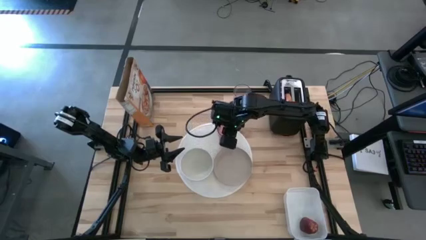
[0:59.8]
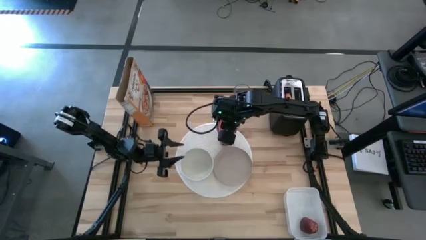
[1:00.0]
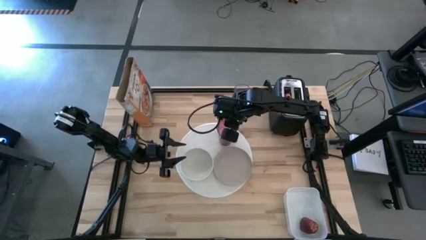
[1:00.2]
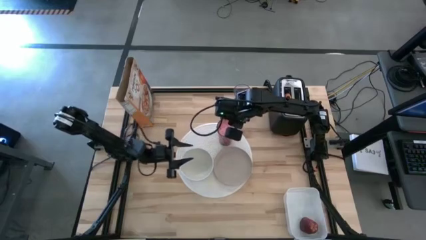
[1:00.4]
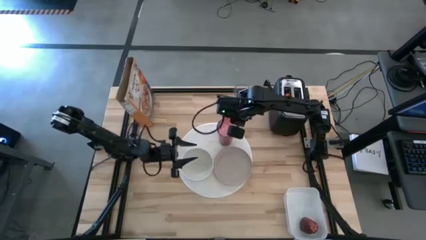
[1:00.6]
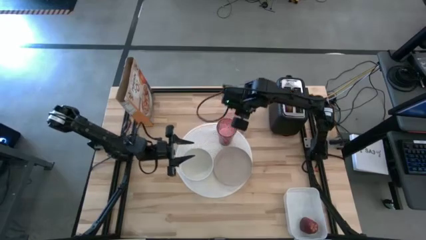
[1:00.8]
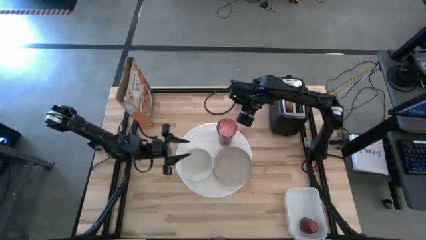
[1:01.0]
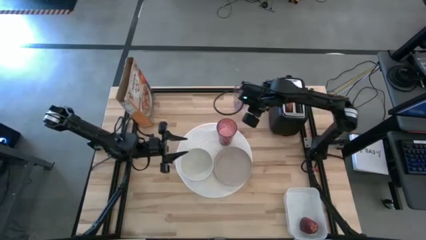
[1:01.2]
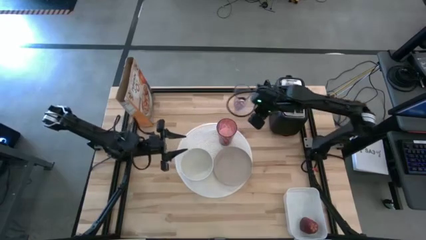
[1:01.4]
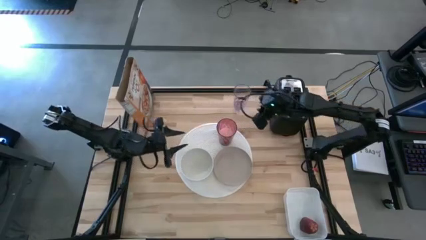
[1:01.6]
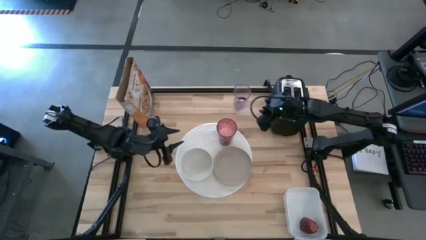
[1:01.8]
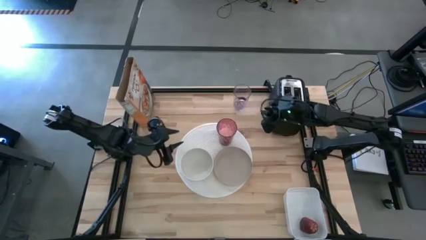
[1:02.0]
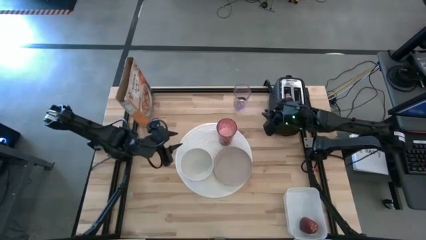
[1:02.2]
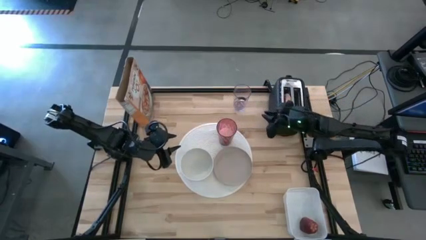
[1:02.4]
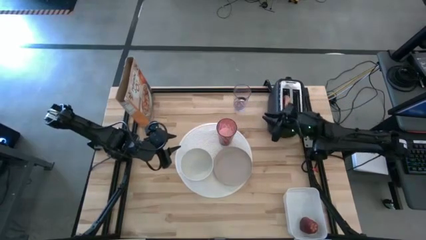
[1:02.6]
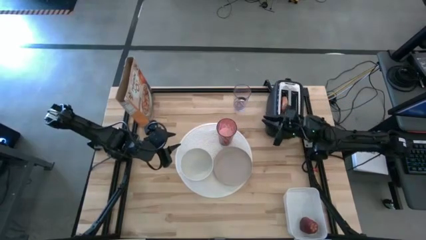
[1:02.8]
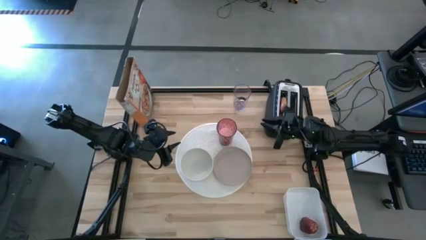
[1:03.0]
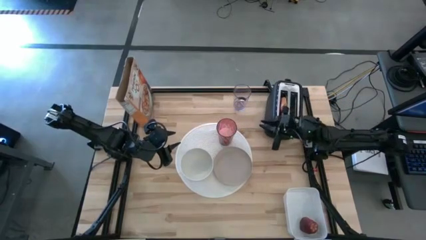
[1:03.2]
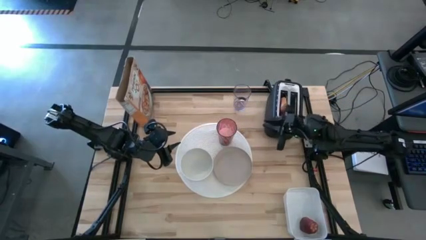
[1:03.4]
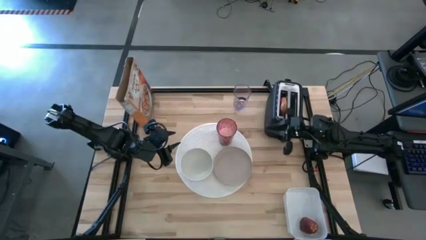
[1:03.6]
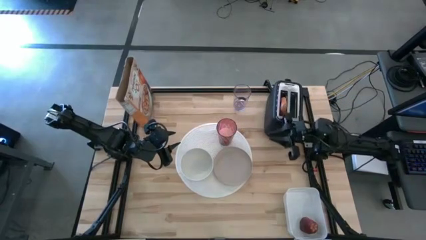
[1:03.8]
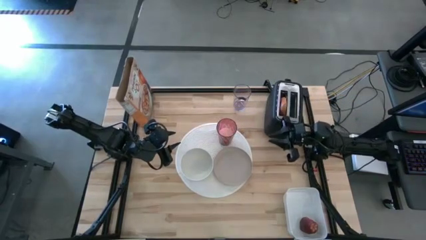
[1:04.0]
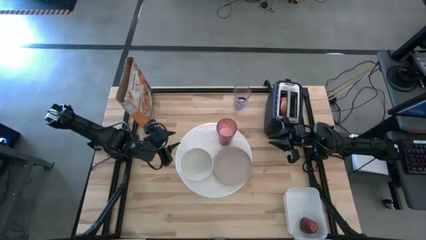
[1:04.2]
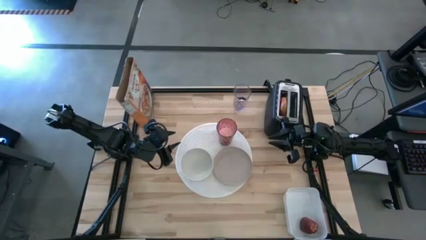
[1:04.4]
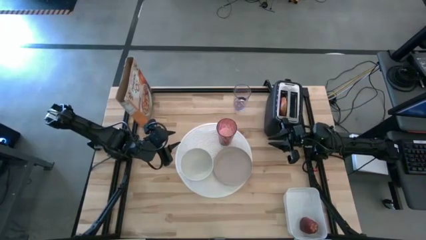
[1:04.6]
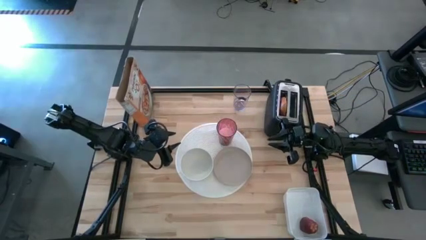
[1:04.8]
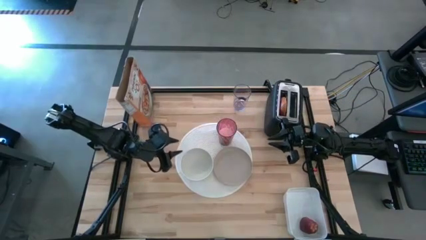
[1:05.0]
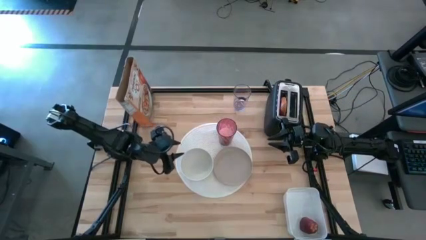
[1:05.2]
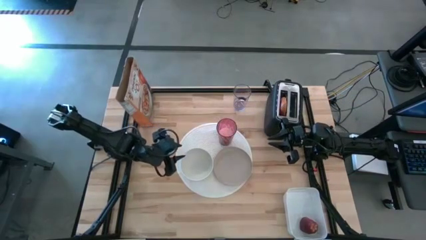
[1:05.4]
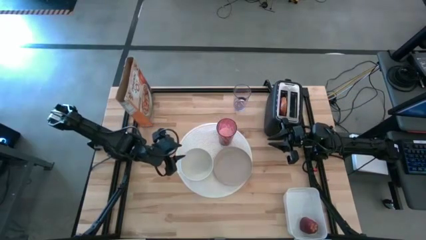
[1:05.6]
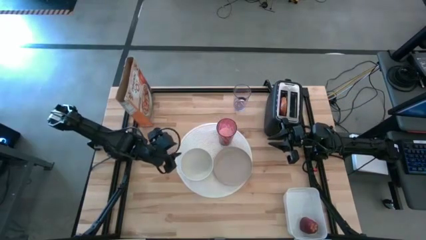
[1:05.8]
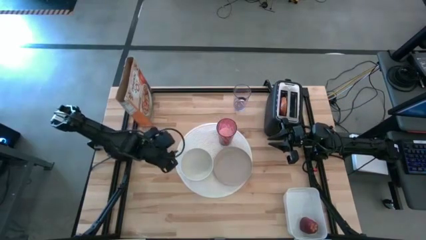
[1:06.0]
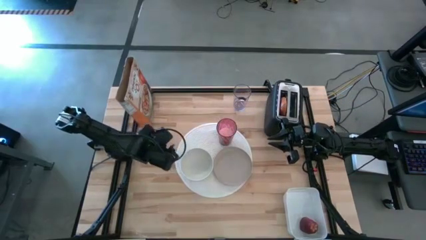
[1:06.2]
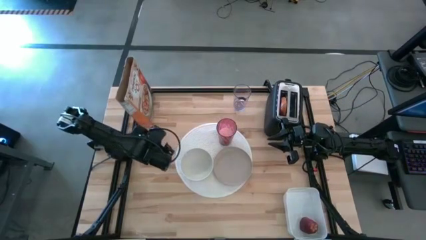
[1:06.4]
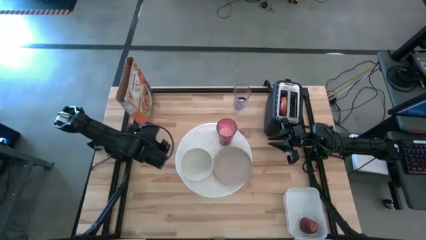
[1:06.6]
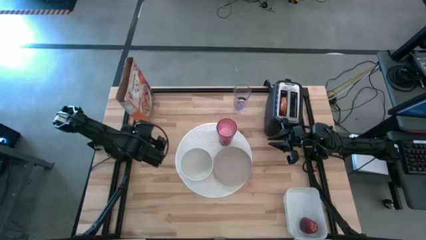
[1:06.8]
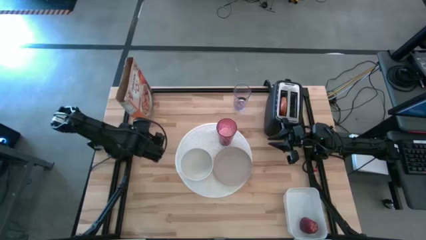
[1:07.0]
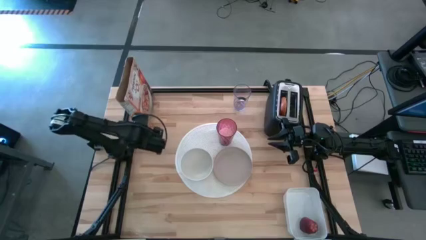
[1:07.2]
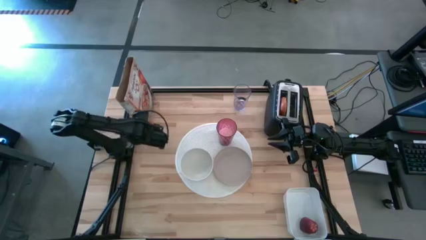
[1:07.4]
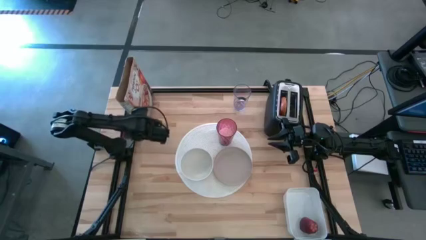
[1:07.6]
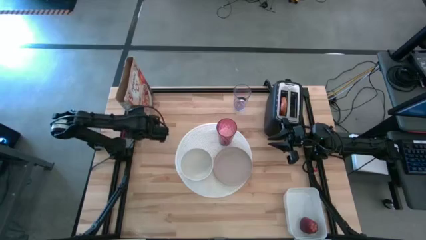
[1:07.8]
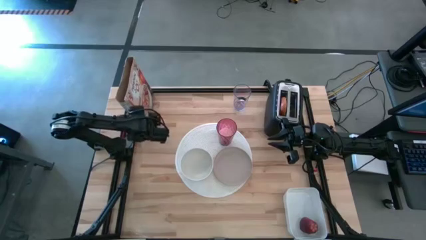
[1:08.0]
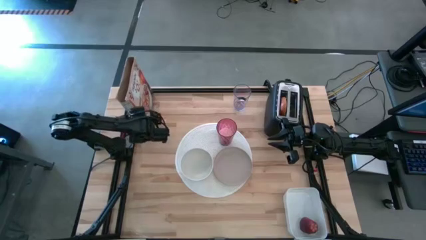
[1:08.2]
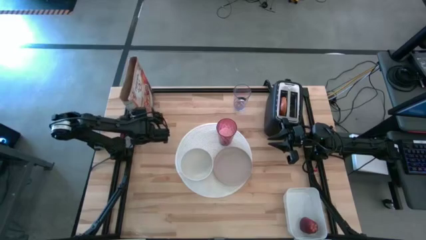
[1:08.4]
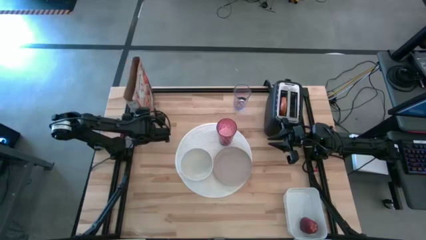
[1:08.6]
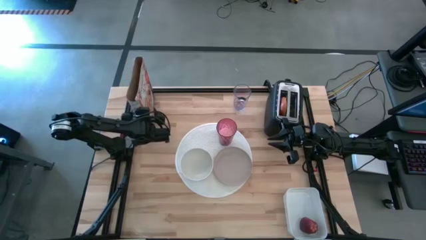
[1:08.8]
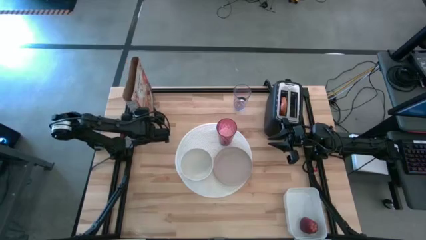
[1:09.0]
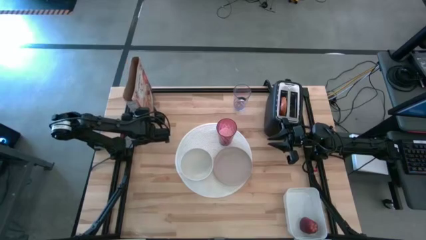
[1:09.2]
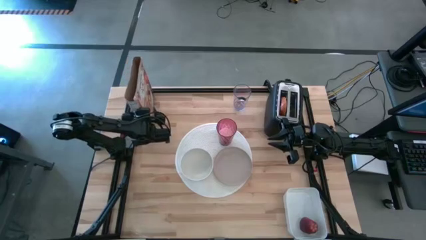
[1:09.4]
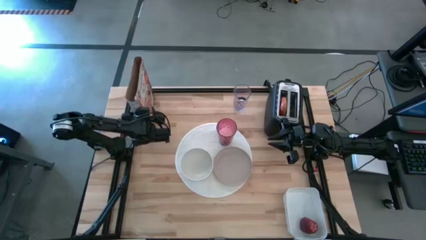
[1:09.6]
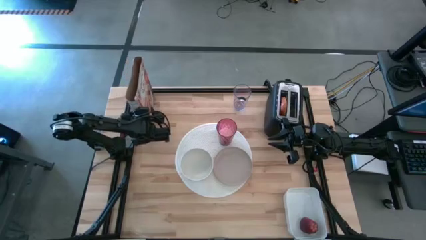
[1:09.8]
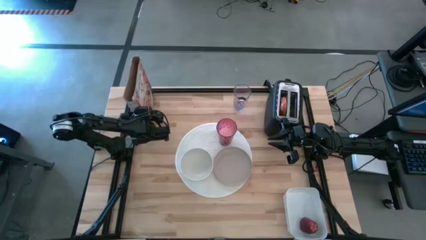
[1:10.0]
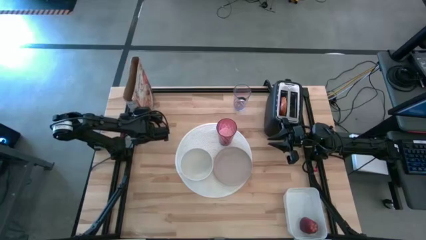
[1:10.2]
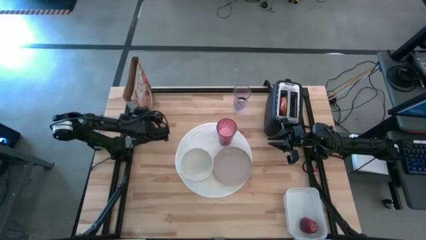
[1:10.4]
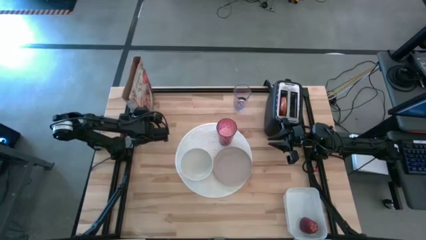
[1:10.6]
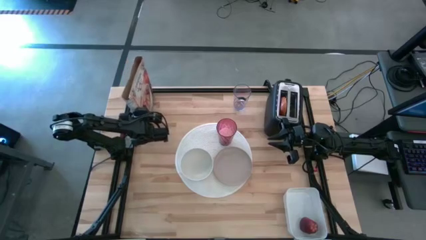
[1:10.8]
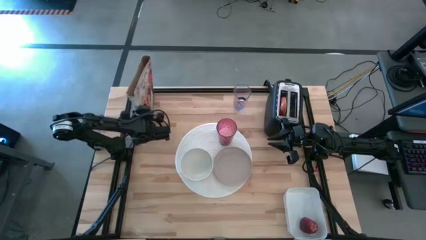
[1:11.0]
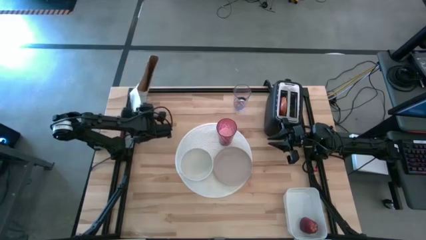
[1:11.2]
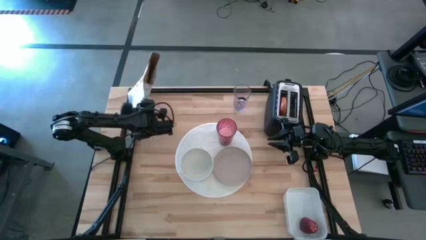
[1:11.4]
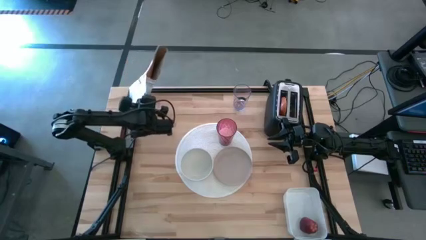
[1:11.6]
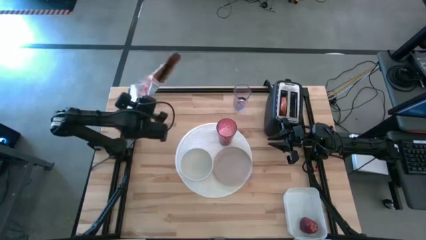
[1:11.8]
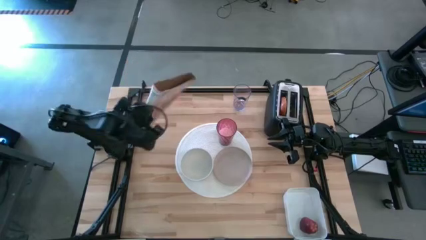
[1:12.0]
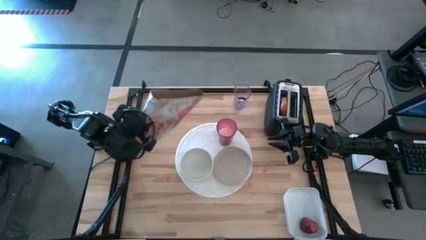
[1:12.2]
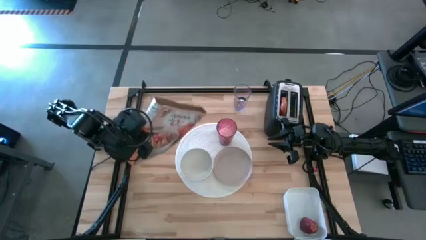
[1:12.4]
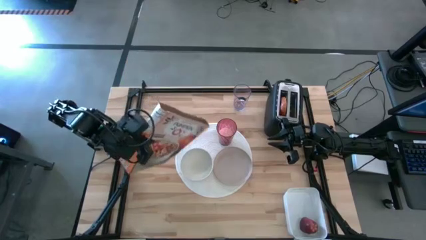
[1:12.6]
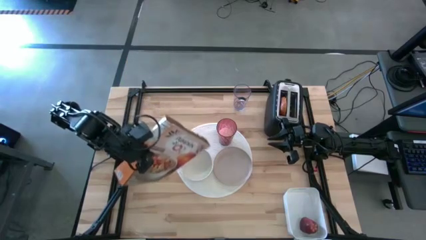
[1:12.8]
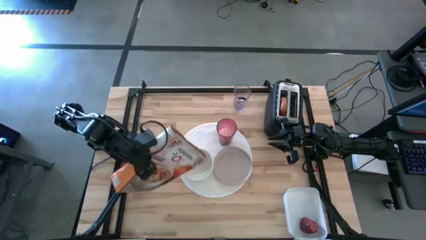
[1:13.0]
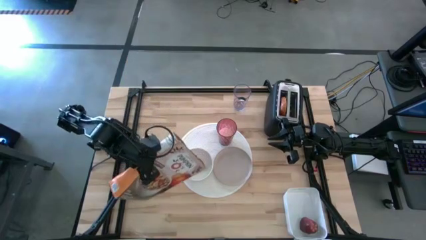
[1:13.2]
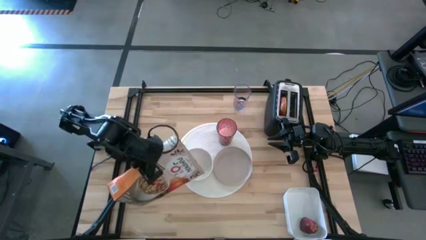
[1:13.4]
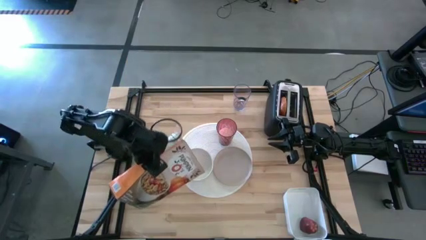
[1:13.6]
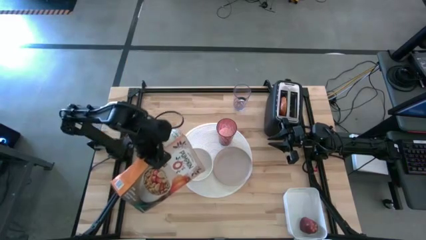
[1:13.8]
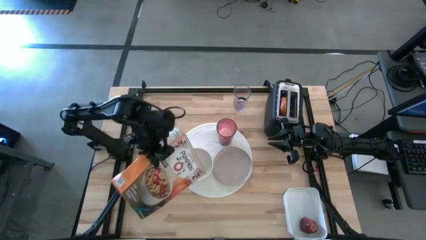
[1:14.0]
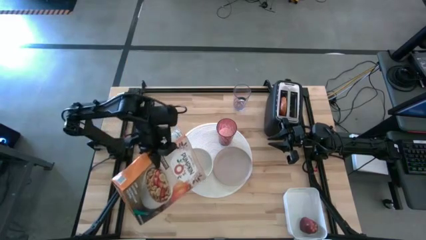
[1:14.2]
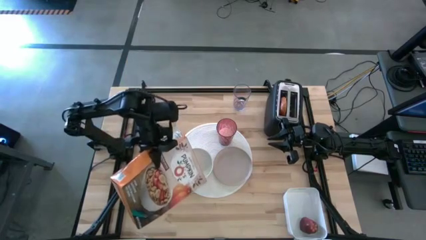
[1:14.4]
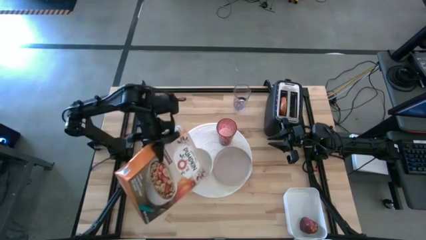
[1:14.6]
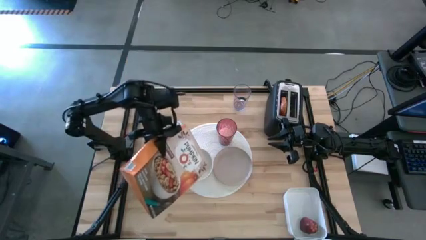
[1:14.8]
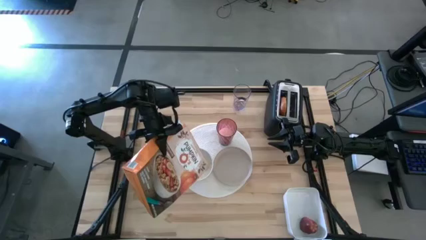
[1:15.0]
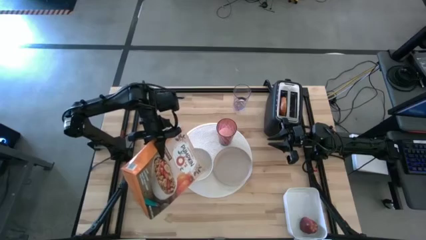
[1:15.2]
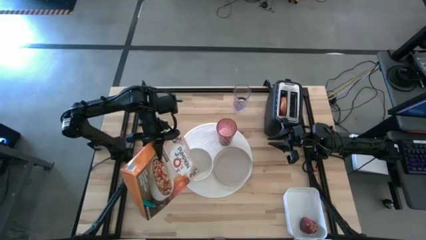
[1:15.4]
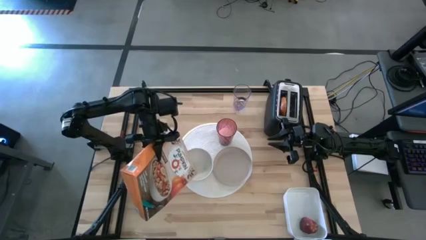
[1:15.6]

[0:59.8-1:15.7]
Task: Arrange a breakfast setting
Pour the cereal from the orange cereal box into the white bowl

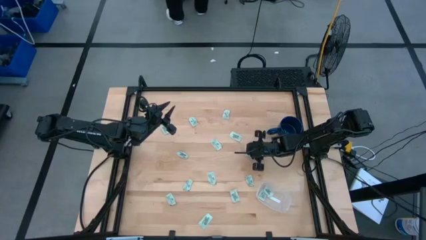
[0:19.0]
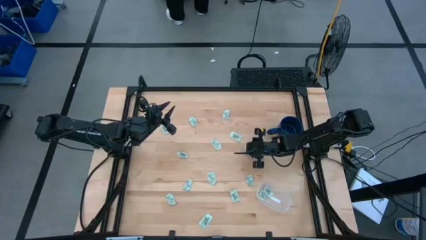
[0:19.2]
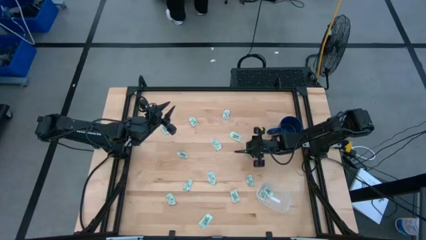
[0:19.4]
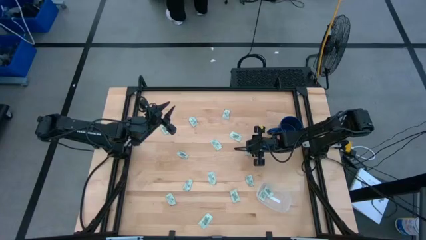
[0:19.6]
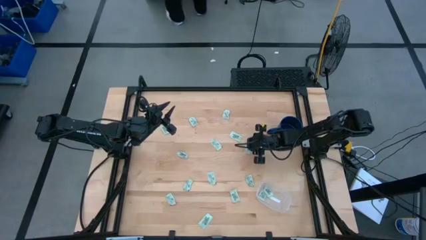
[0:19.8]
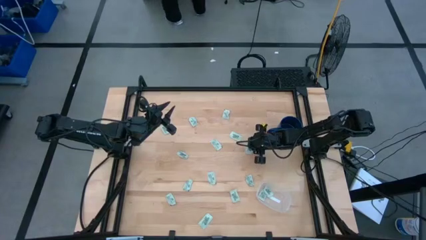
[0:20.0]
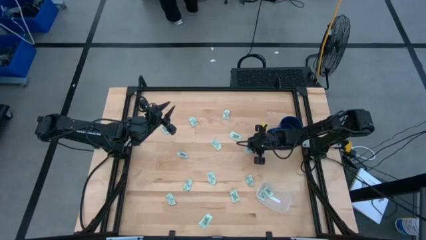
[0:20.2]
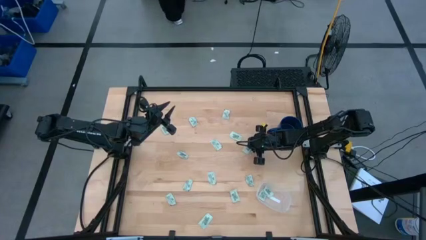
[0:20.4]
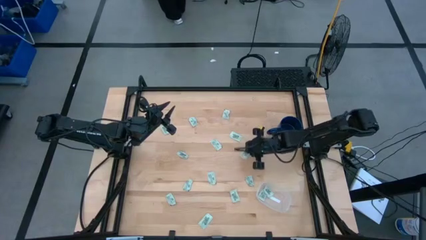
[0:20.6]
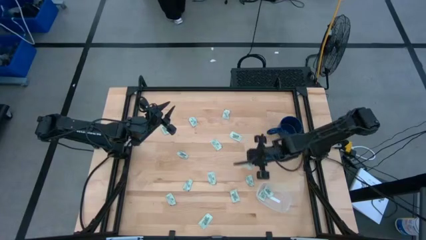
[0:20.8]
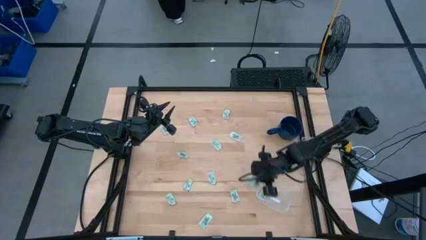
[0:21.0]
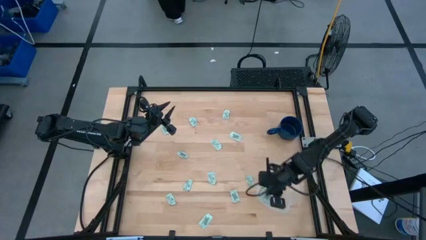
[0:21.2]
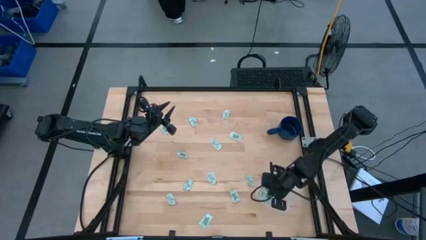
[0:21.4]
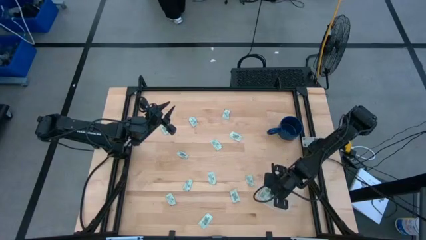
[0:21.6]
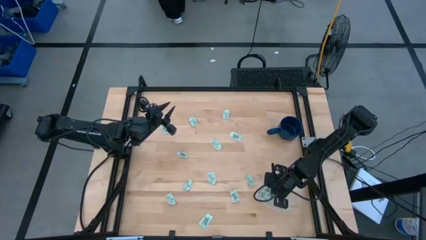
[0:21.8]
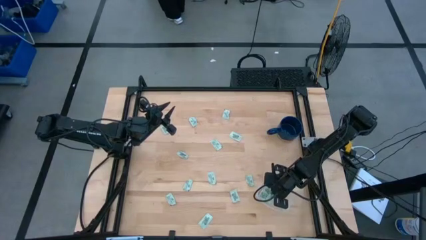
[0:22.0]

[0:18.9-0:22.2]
Task: Pick and place Stevia / Truvia into bins
Put the stevia packet into the transparent container
